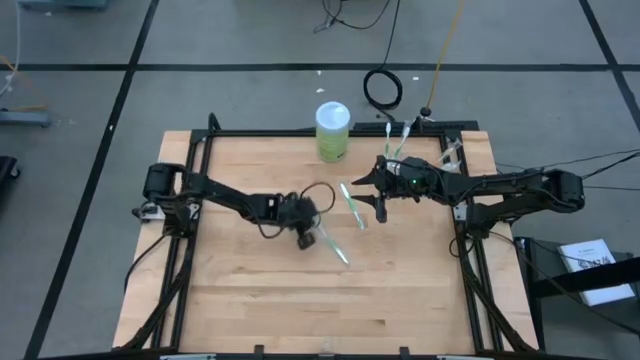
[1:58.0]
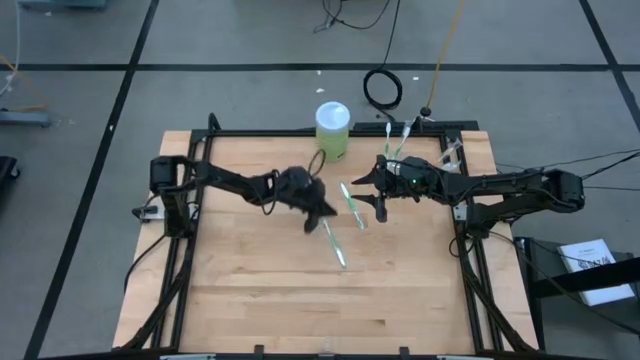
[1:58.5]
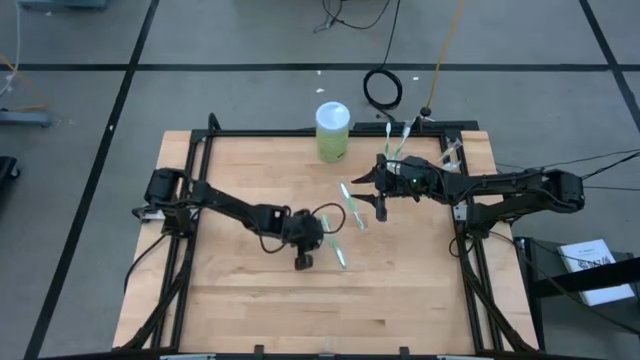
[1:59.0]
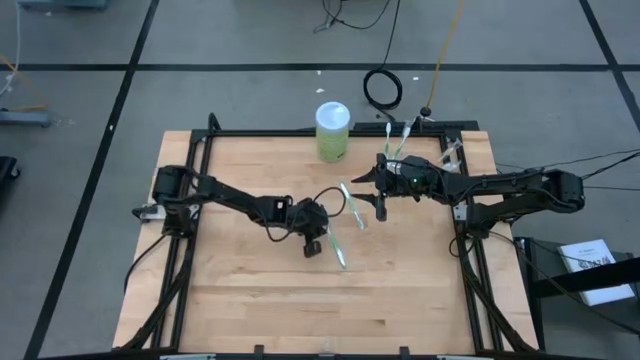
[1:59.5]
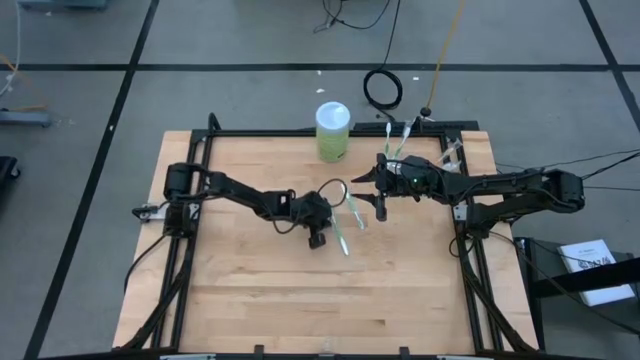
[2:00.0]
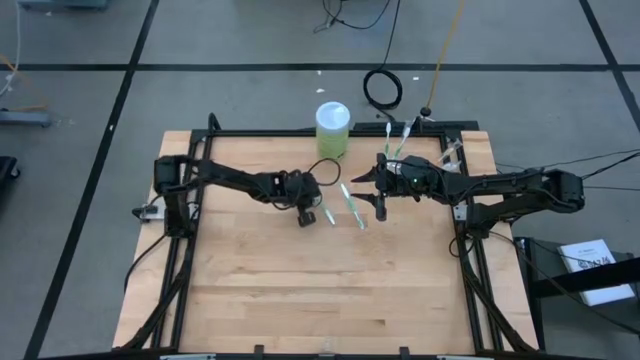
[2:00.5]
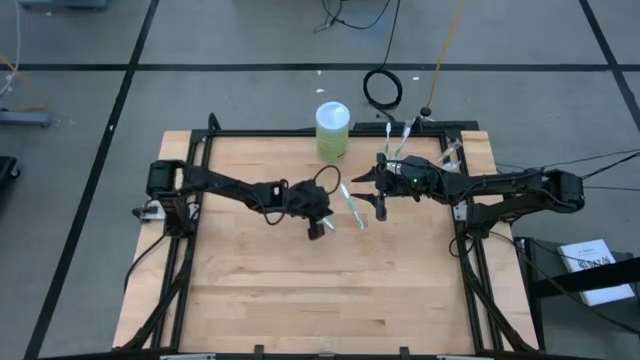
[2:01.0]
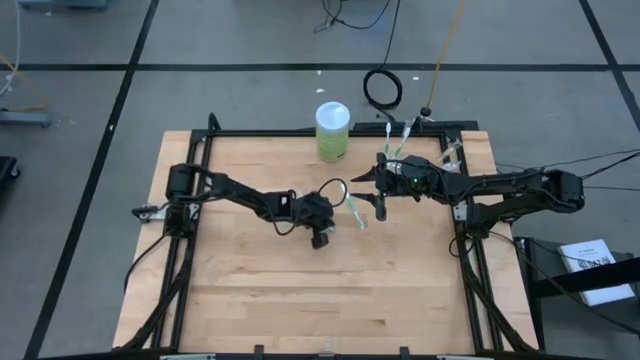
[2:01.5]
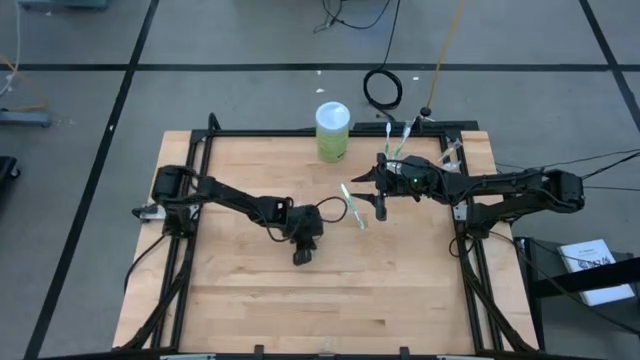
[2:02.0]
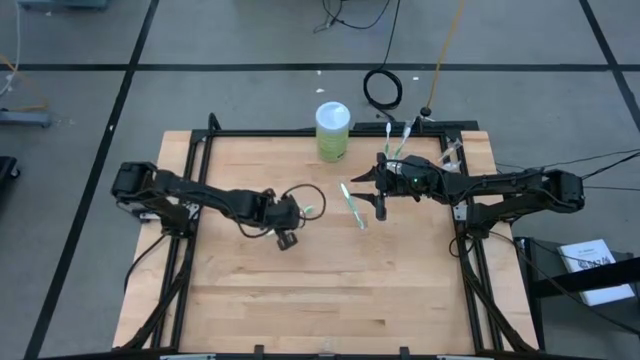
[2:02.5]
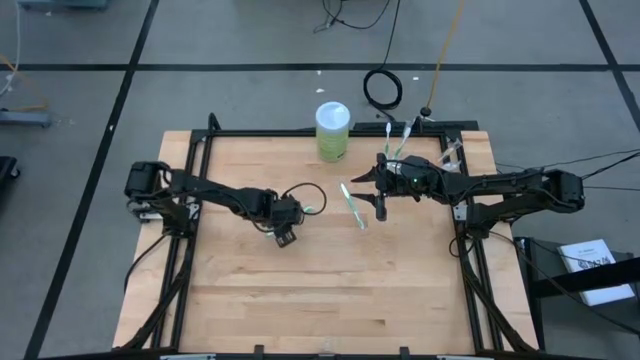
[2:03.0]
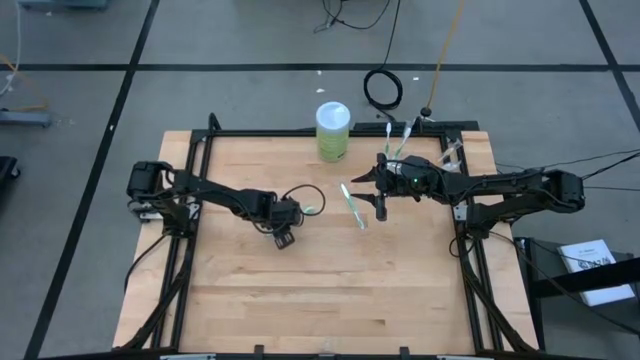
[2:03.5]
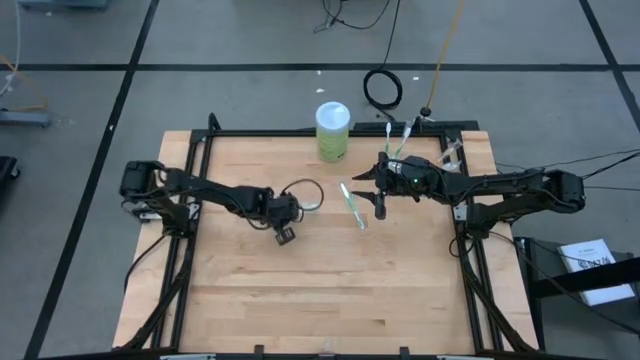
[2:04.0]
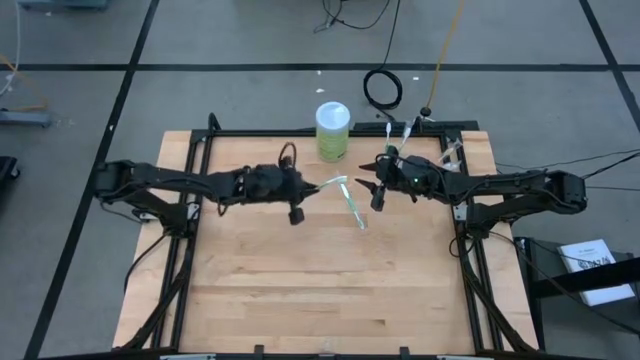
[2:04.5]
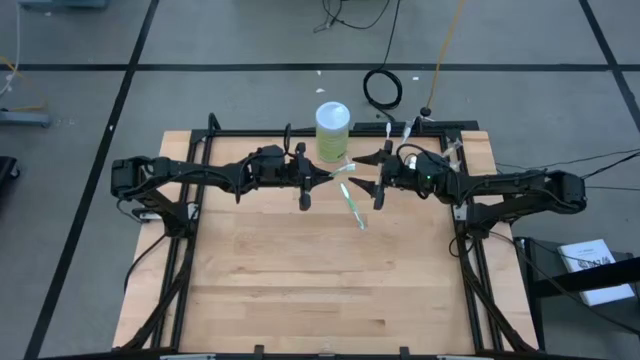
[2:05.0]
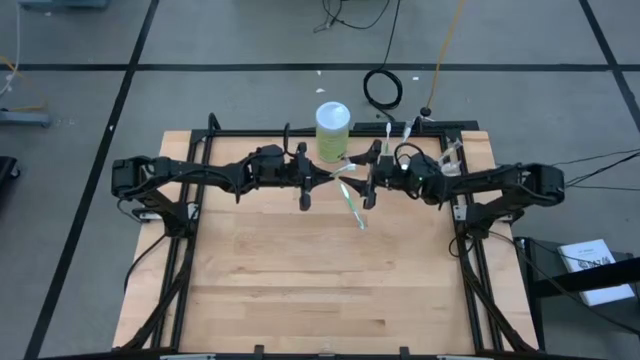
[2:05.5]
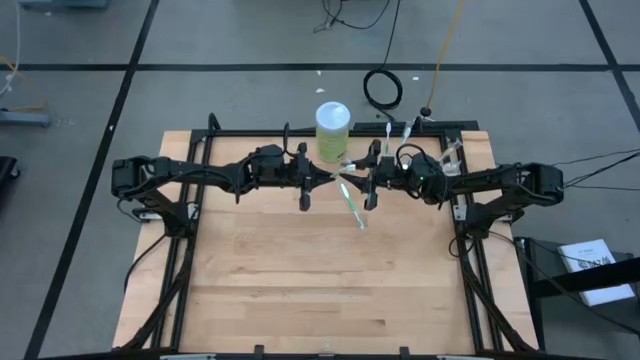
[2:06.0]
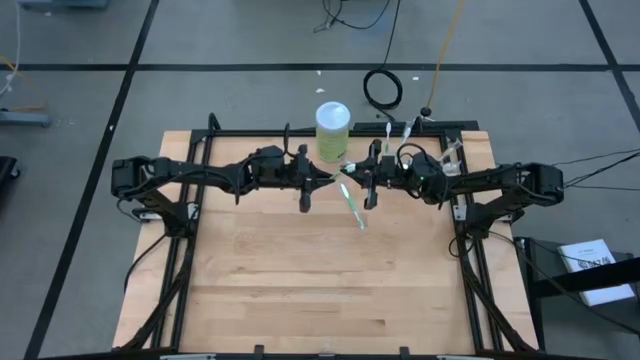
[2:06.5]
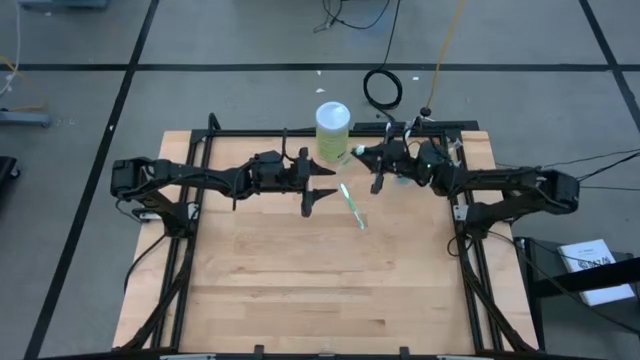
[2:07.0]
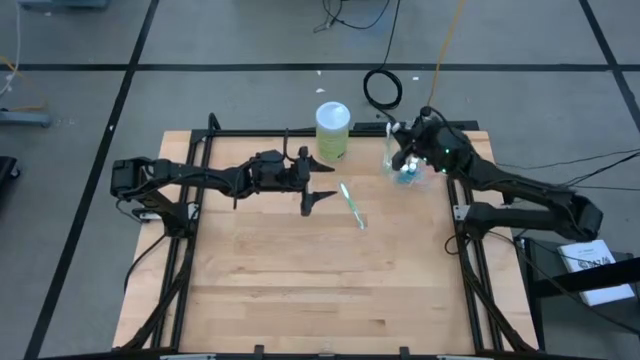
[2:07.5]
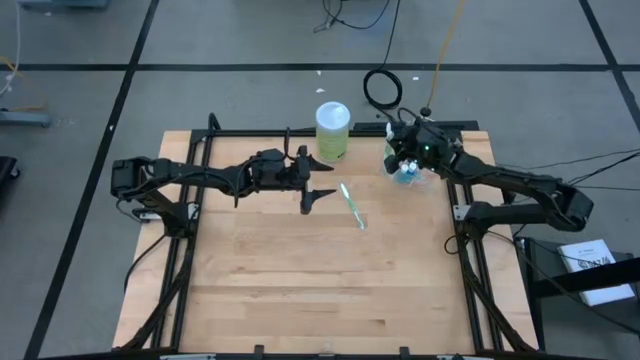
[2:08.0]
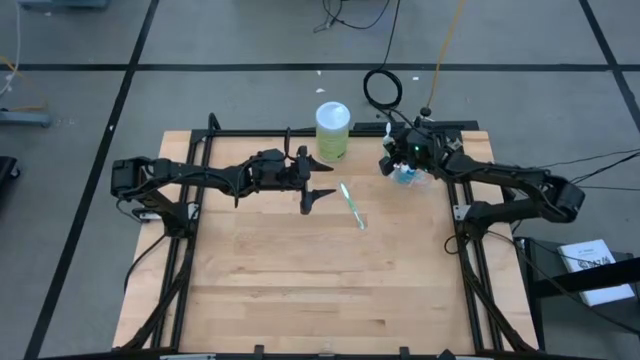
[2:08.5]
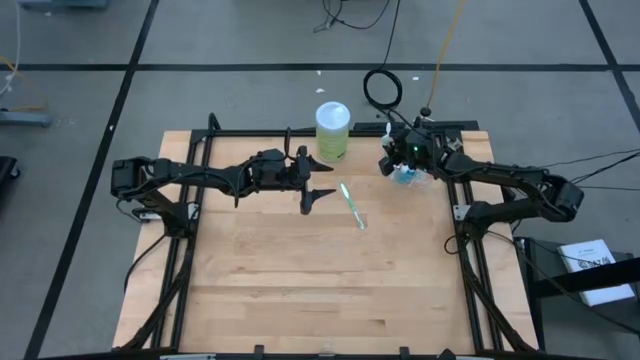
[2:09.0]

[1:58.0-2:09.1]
Task: Pick & Place toothbrushing station
Put the green toothbrush into the transparent organizer

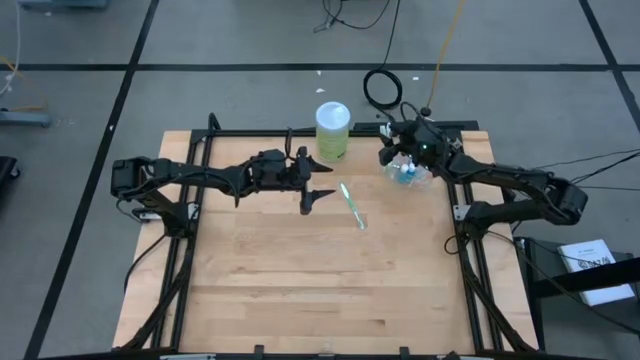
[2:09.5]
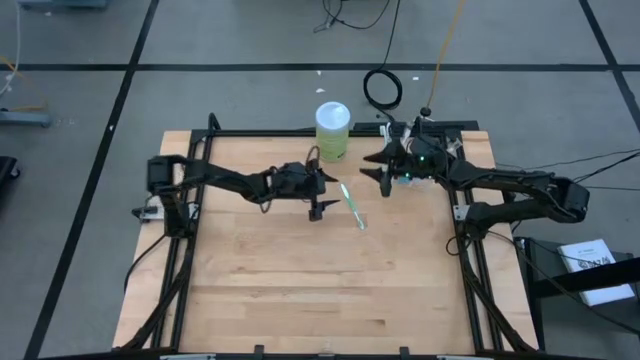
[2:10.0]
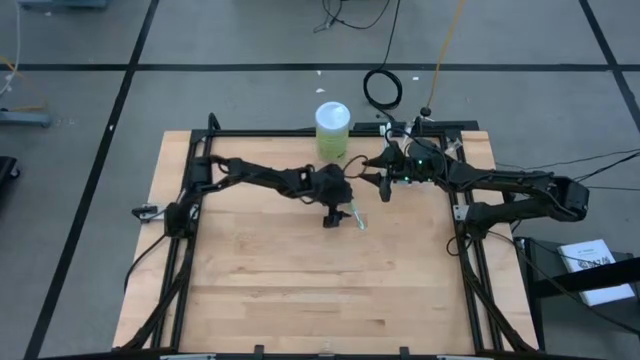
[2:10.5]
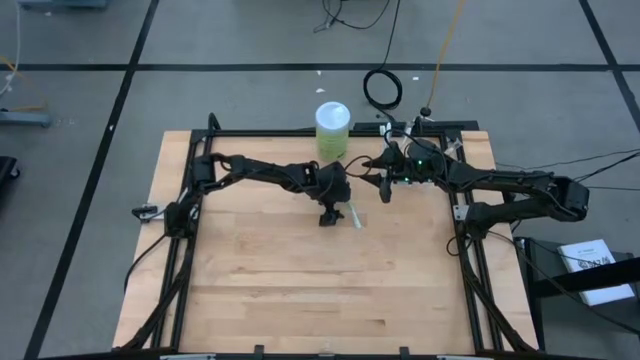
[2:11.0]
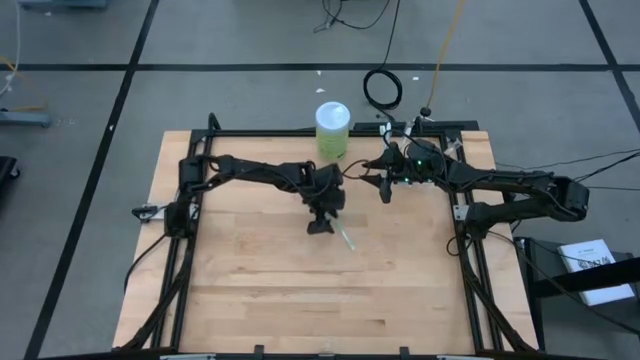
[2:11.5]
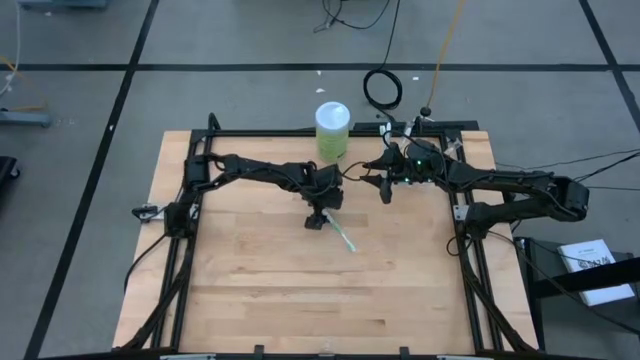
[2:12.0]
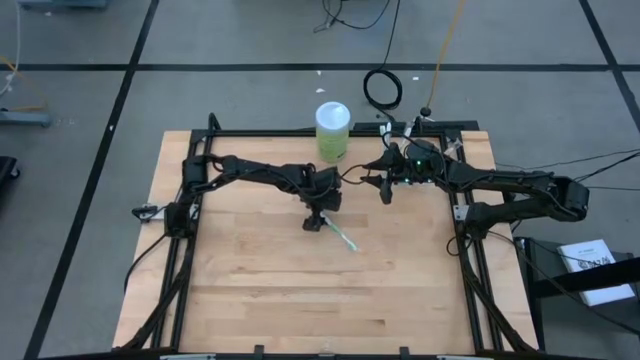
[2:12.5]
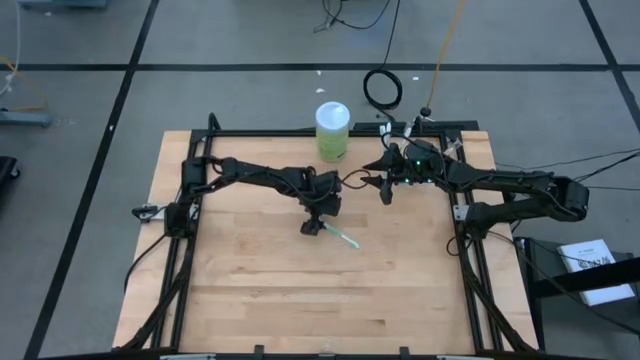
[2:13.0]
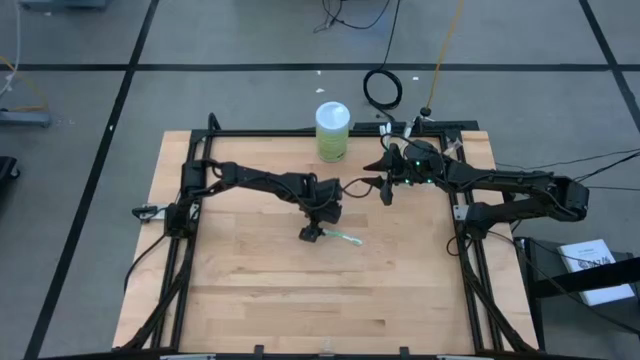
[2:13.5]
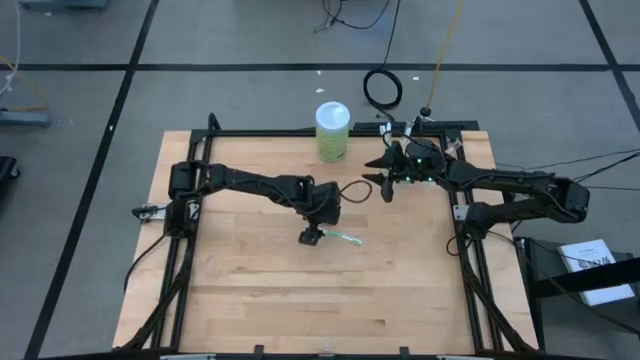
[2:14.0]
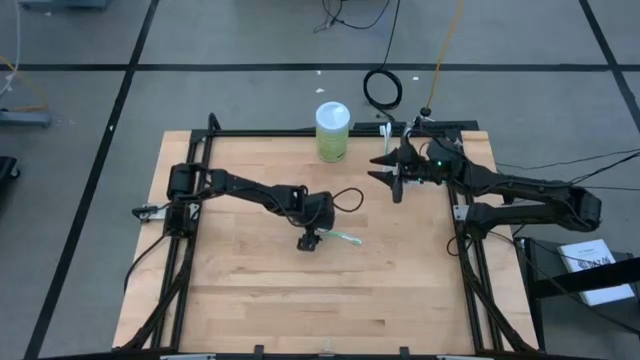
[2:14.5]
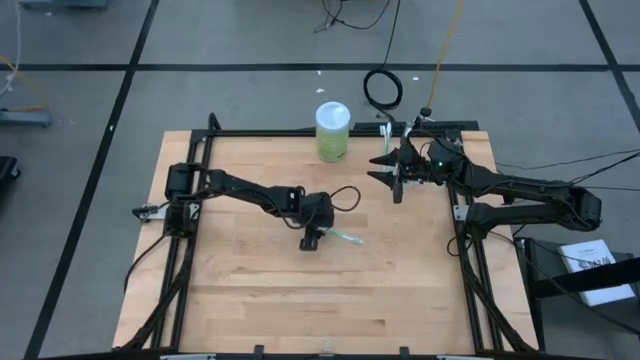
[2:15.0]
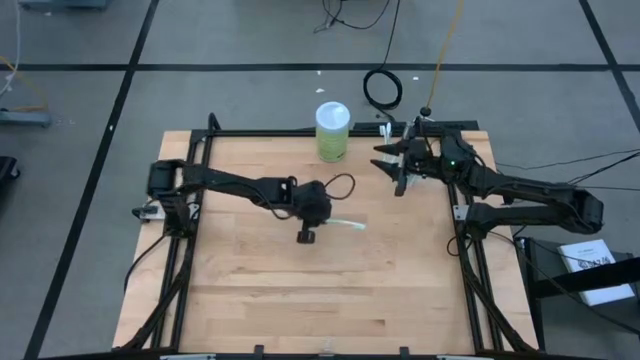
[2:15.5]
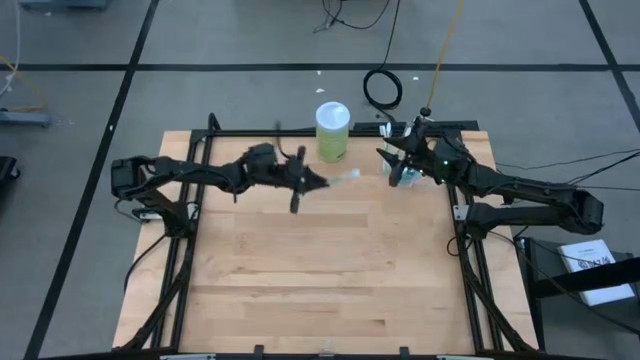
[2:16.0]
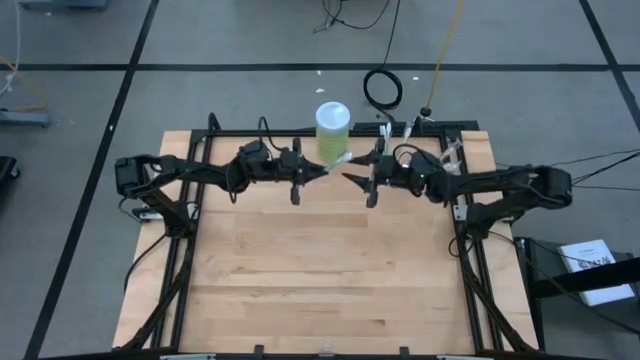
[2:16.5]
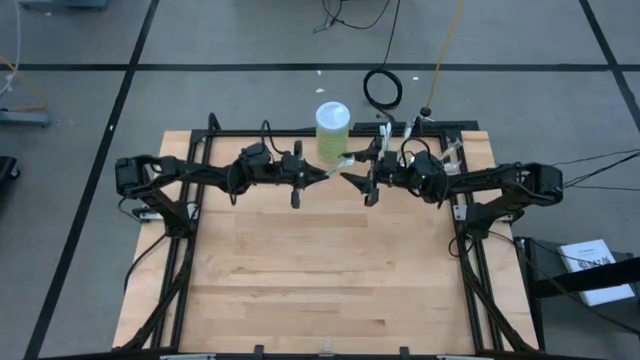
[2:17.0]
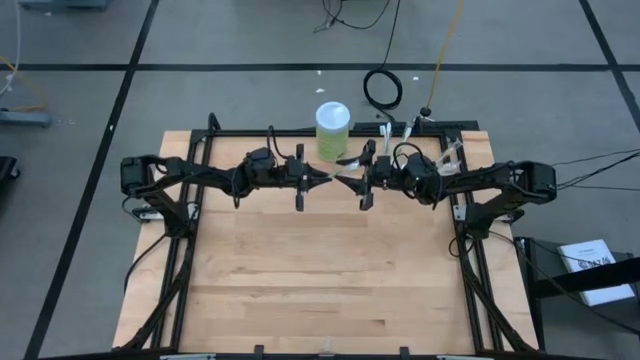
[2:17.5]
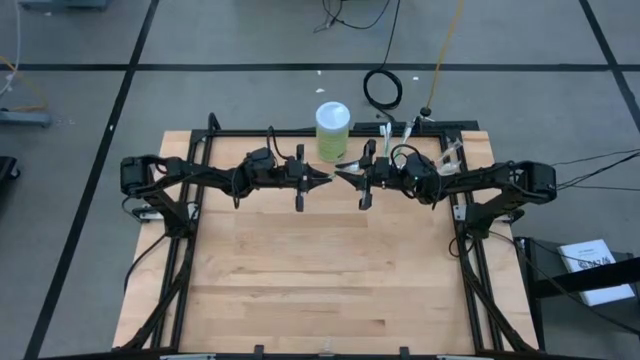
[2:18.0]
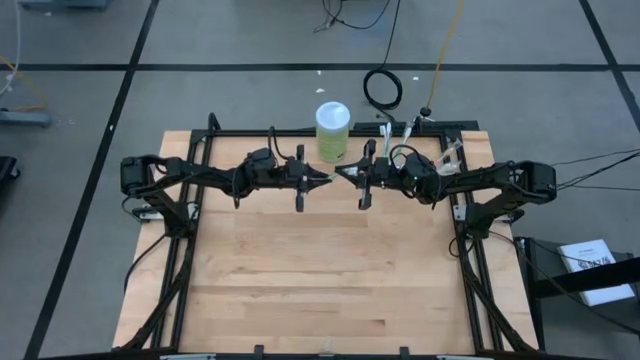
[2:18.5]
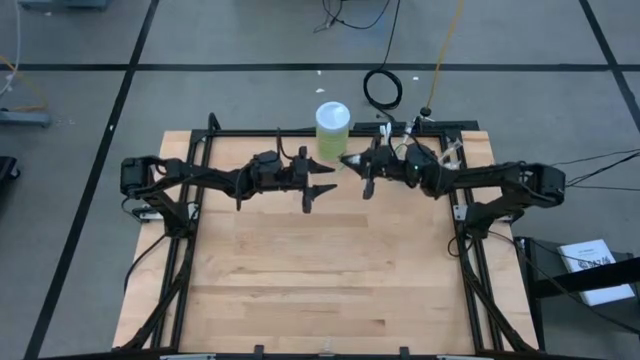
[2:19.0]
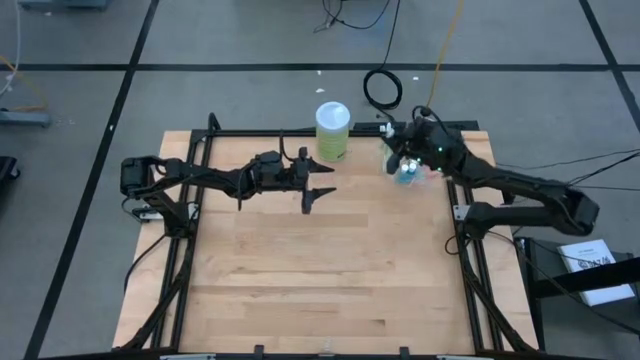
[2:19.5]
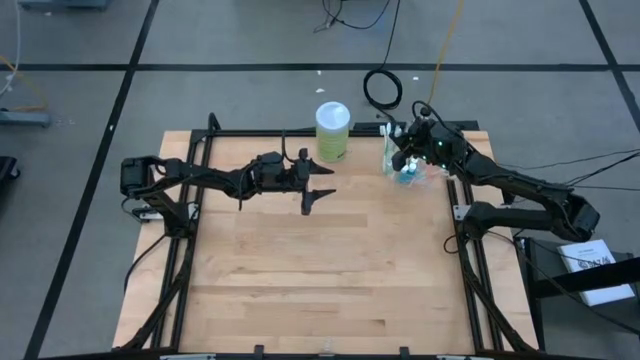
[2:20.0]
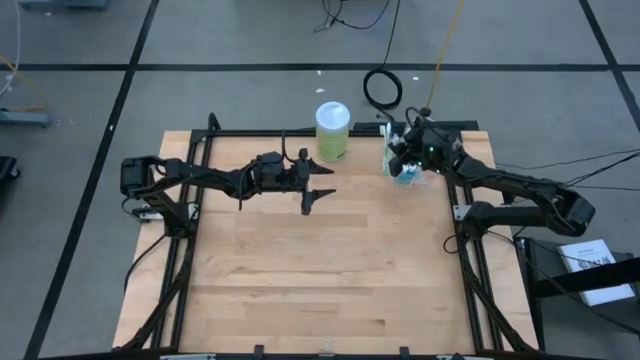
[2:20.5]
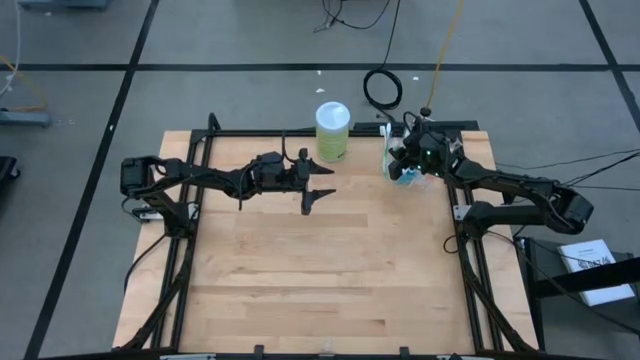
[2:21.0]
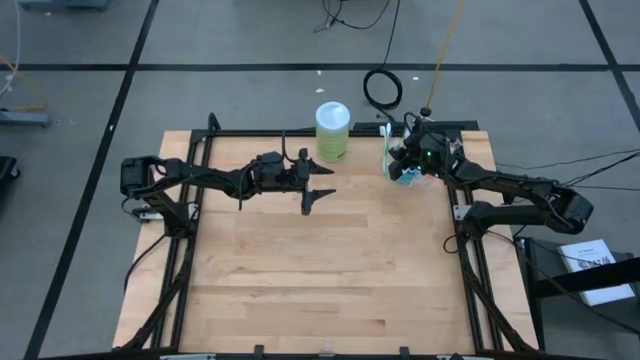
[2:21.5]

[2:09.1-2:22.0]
Put the green toothbrush into the transparent organizer
